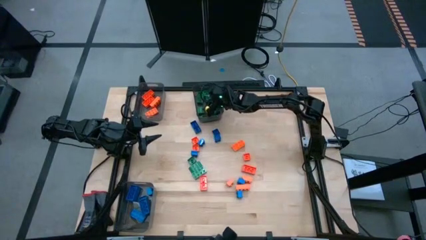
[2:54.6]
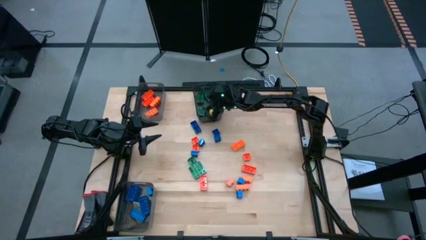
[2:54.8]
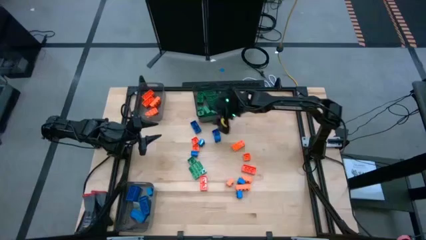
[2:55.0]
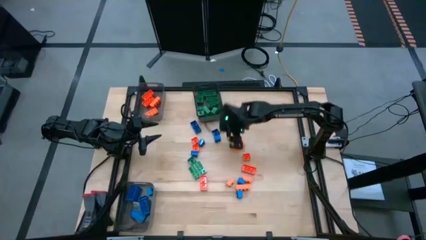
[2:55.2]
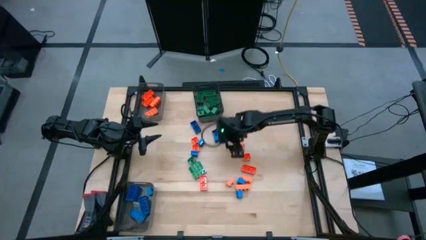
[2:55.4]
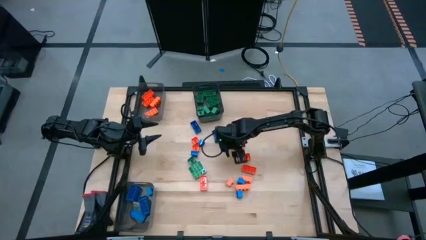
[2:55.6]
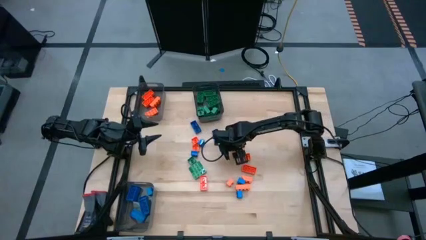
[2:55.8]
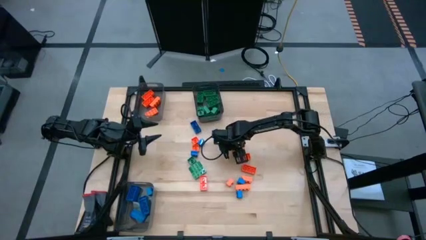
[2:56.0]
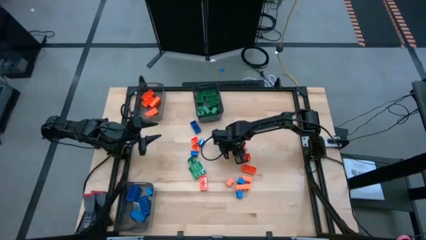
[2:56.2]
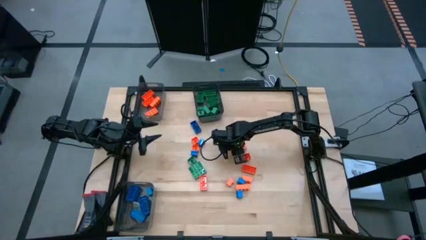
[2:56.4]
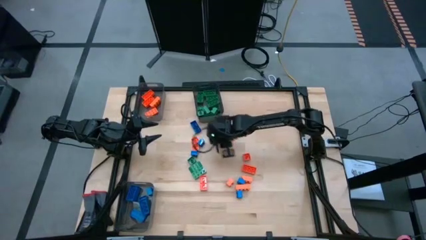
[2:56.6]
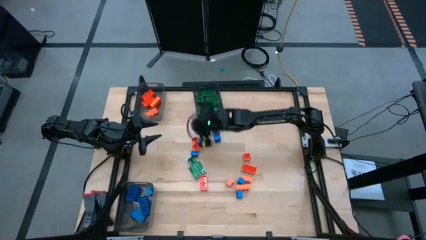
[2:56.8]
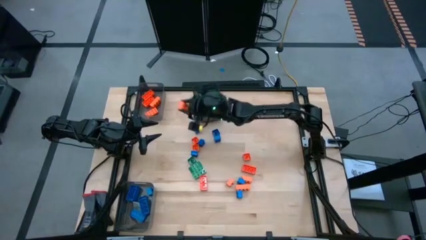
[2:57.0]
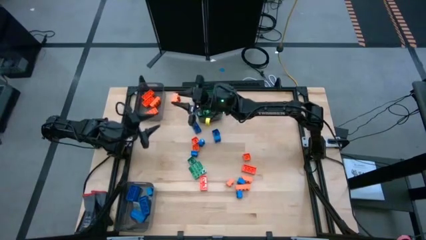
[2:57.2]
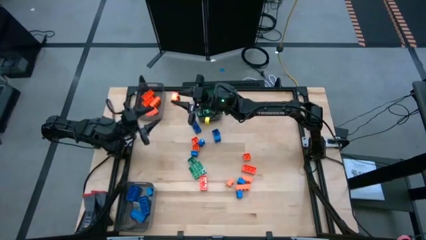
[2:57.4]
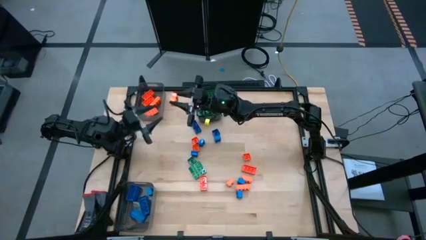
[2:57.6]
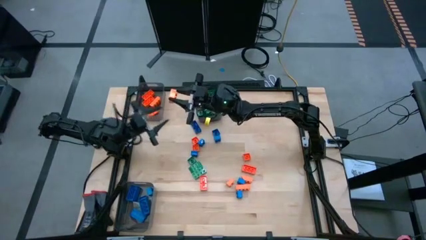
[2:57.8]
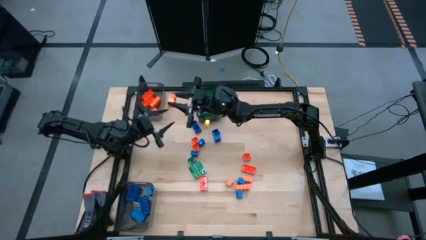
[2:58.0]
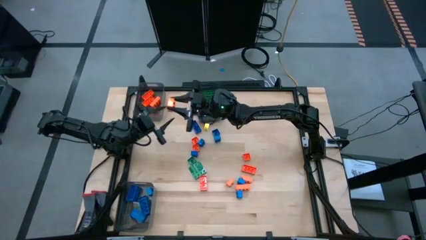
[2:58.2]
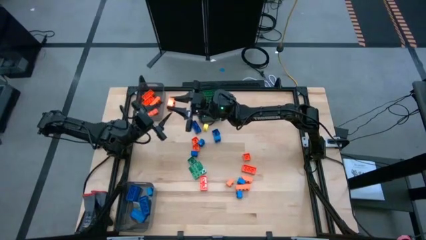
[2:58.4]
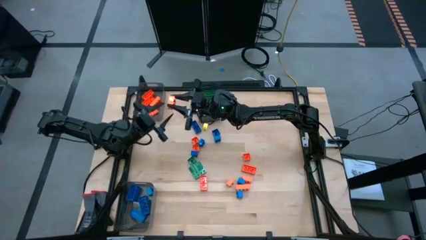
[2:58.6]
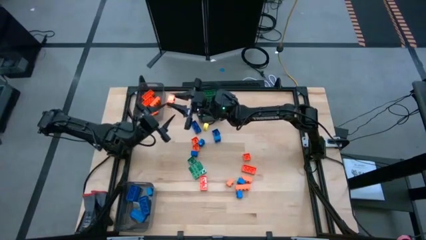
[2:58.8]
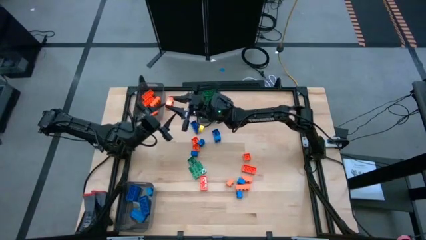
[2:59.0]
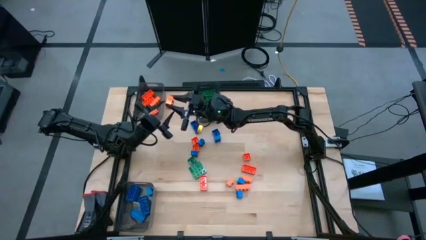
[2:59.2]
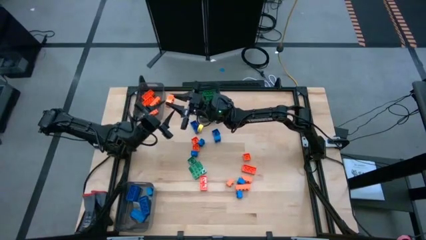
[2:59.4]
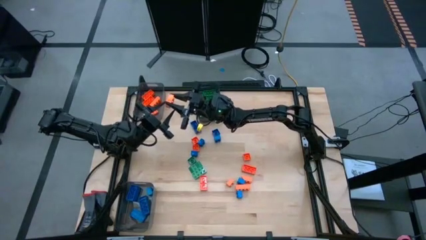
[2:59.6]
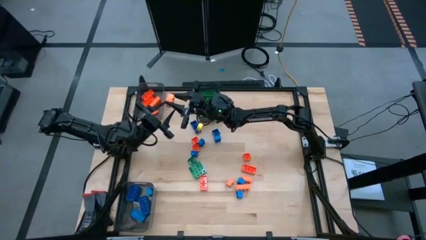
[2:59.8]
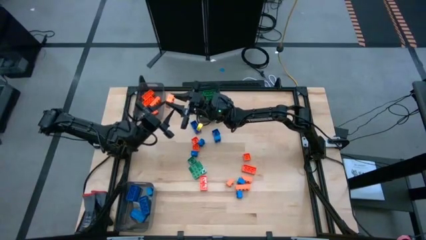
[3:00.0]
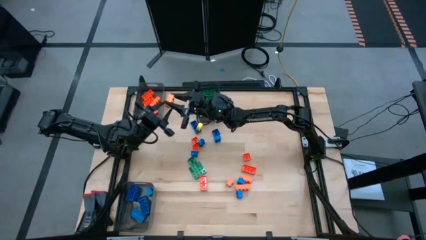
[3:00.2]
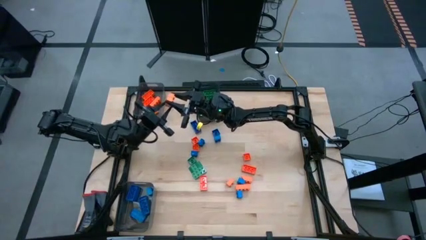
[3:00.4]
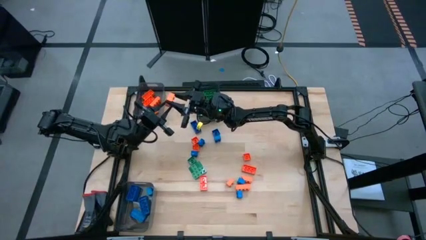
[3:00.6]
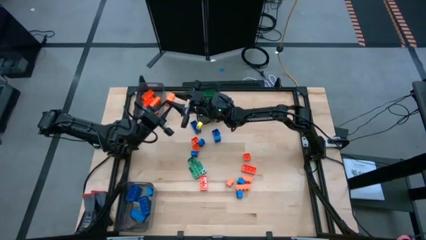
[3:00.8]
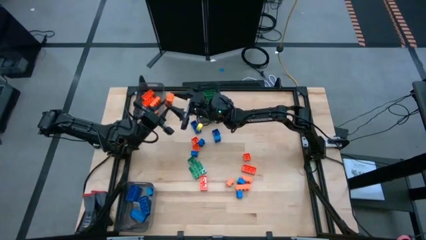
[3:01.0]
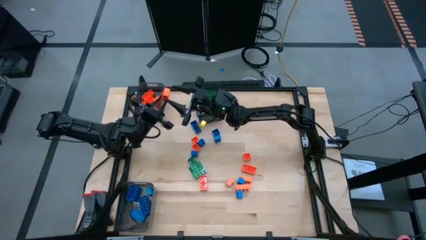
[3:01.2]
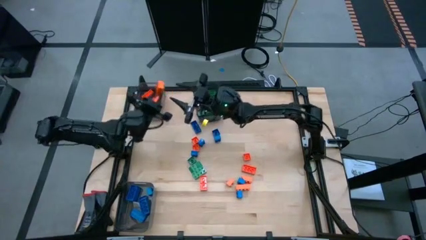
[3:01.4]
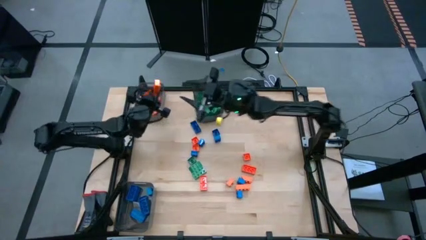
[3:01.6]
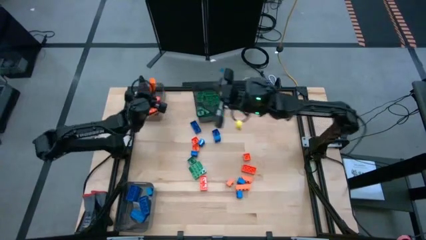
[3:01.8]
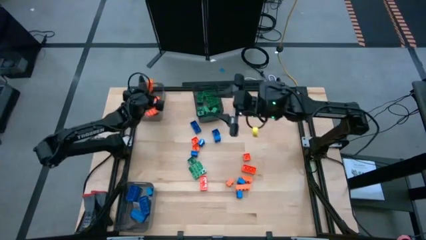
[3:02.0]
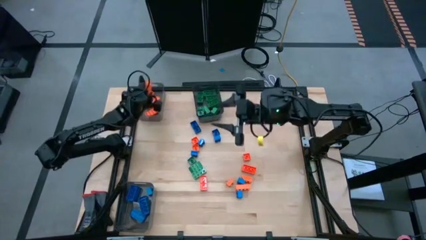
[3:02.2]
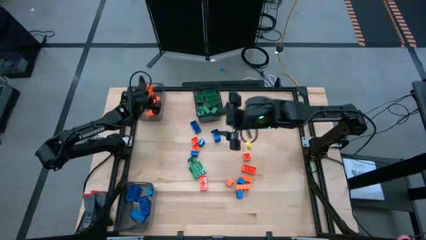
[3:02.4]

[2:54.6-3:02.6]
Task: Sort blocks
Put the orange game piece into the top left black transparent bin

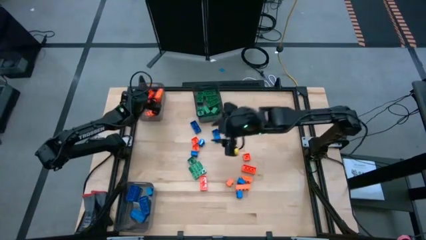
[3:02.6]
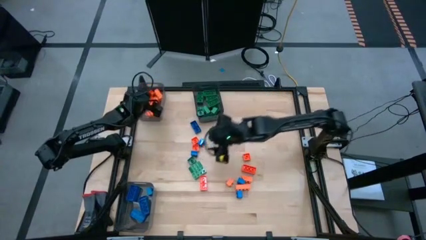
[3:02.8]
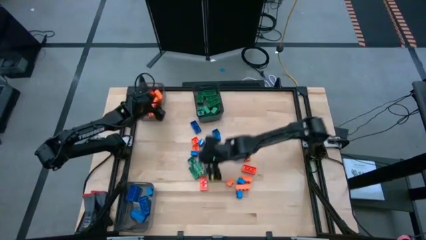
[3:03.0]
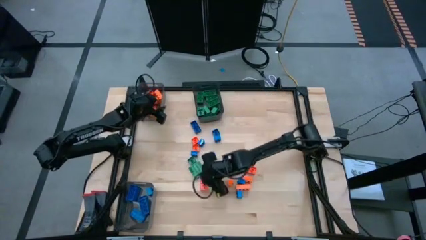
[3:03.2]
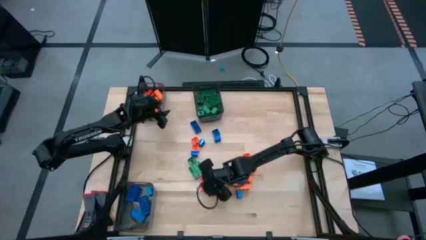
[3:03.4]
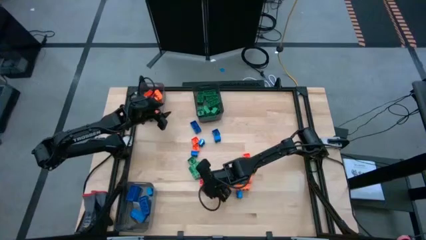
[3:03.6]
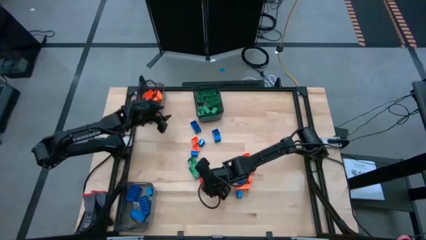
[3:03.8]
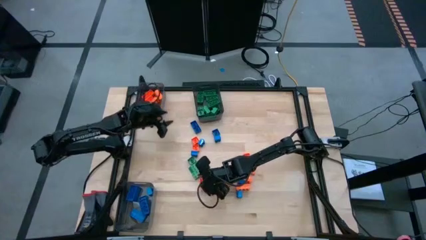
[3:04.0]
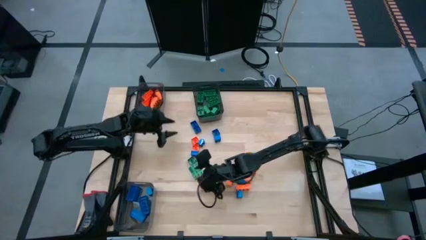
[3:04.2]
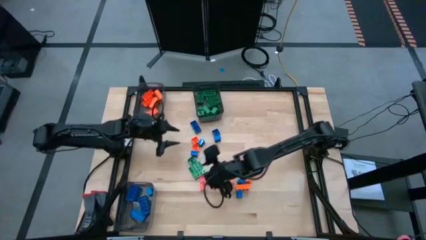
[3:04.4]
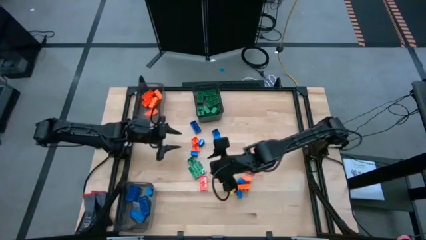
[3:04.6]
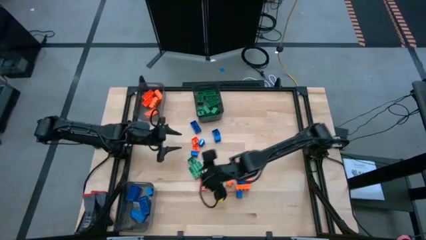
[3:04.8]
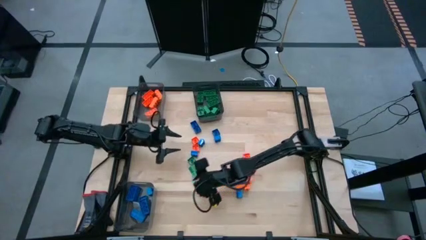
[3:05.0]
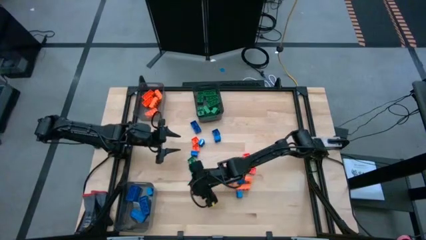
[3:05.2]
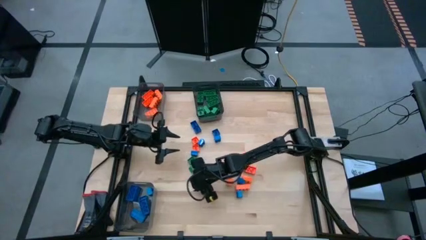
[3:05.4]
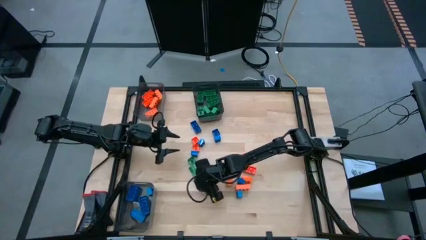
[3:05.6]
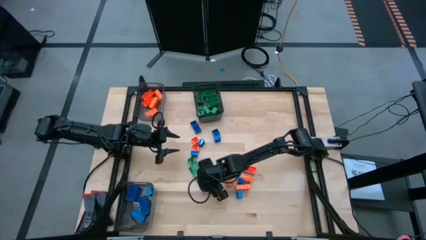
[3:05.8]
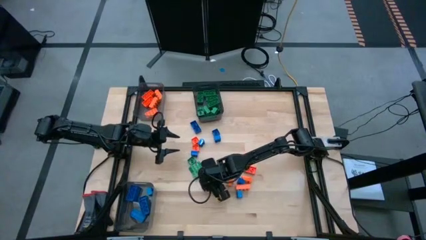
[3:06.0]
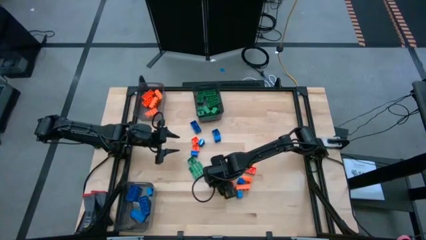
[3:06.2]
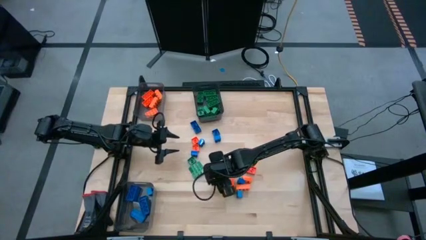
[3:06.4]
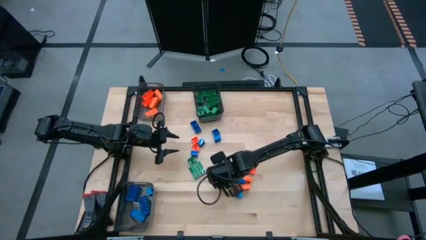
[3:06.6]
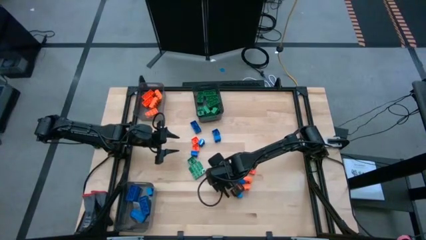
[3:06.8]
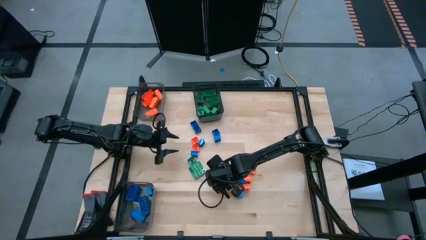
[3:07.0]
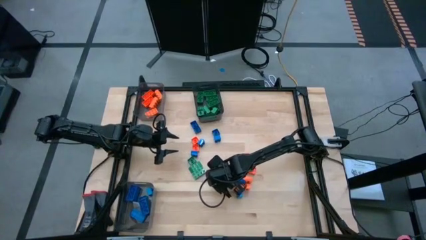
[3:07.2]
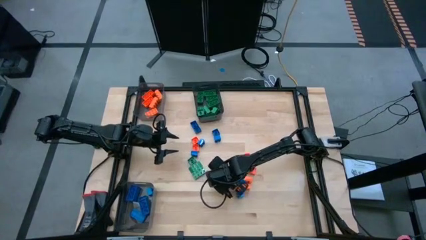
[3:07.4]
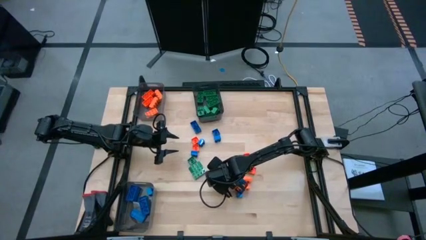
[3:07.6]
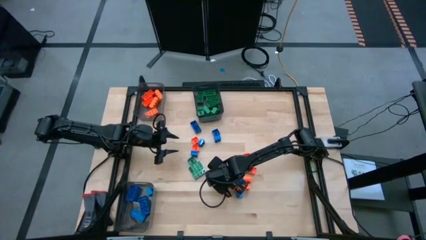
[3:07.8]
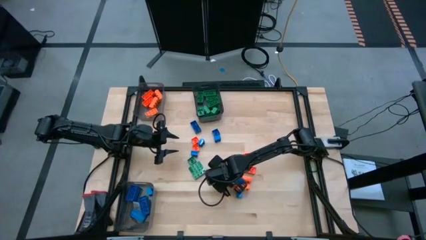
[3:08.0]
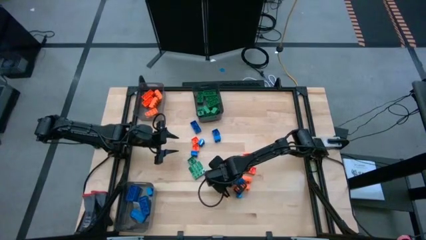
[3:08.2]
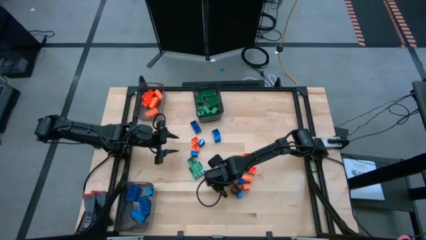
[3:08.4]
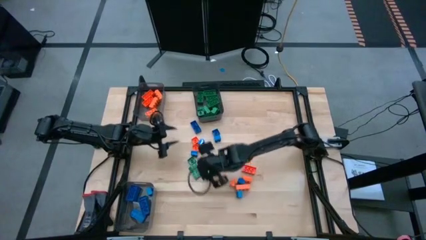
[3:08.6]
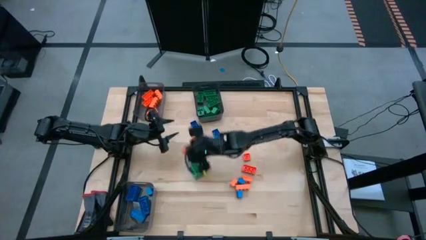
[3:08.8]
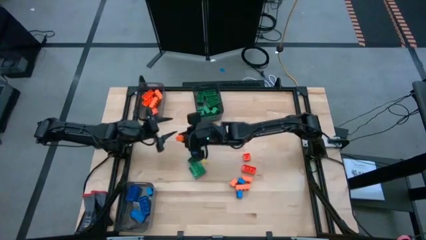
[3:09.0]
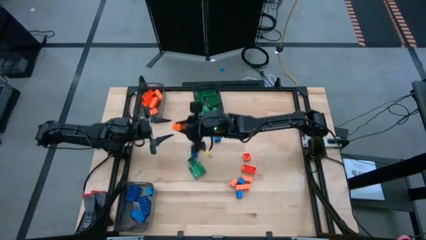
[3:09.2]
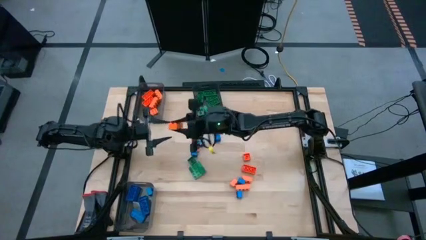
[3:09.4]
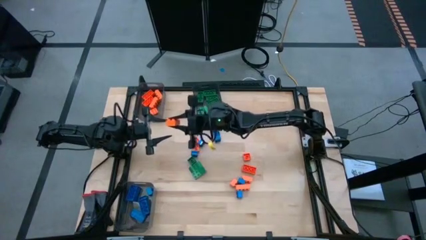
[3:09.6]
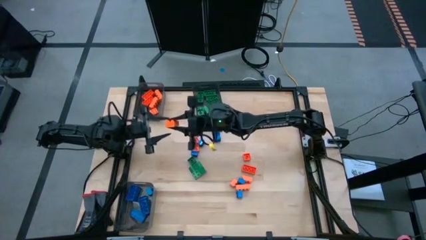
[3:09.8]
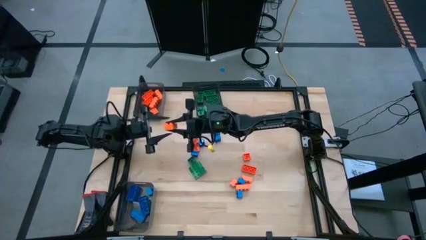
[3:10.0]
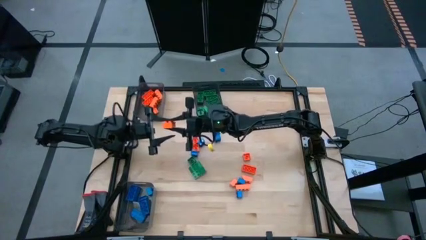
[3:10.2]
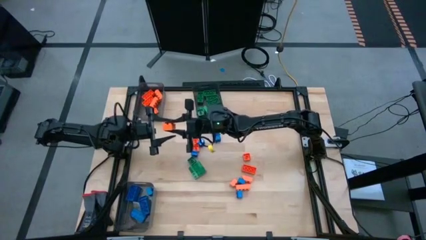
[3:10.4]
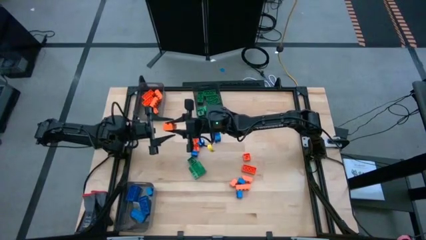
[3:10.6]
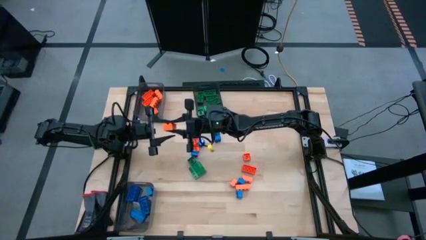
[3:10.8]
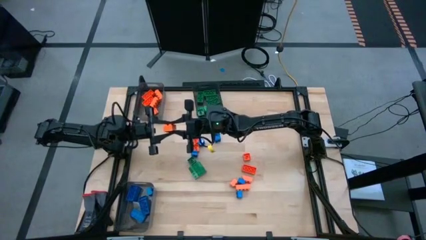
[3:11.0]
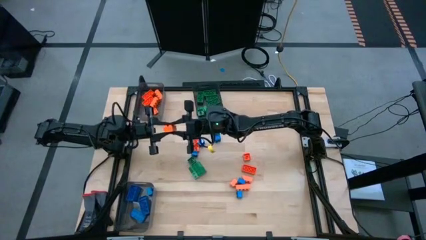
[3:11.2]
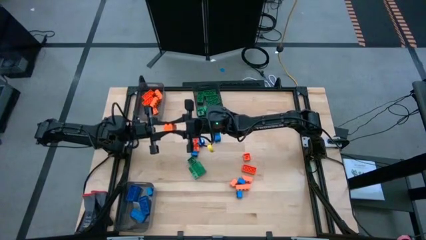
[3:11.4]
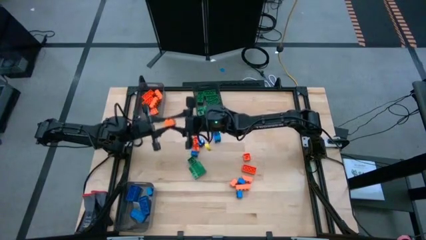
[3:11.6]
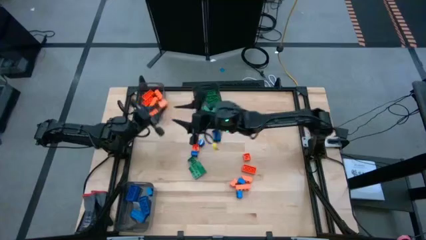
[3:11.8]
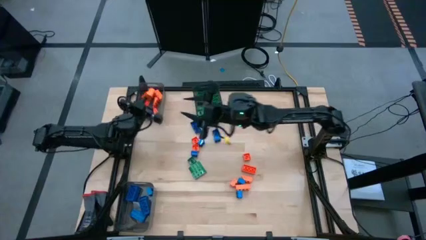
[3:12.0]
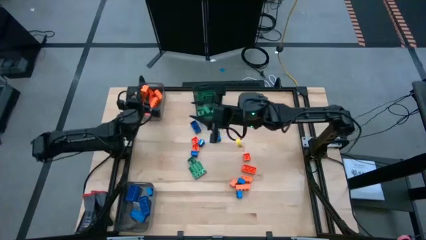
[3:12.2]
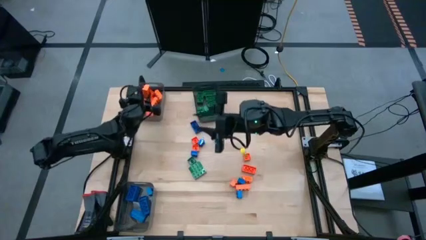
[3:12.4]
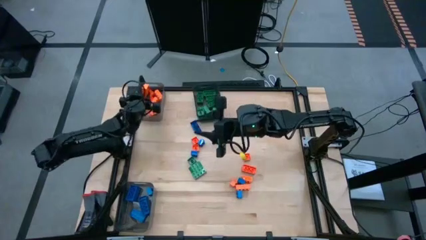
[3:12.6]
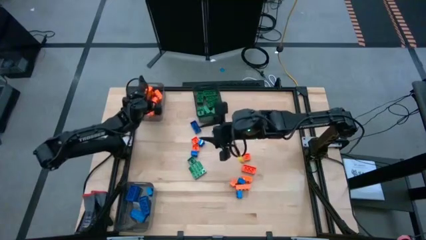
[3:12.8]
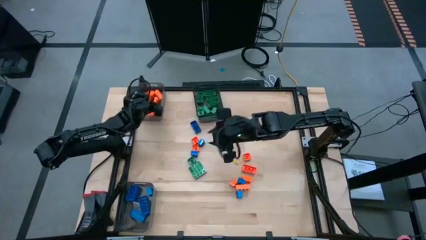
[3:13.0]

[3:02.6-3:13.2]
Put the orange game piece into the top left black transparent bin
